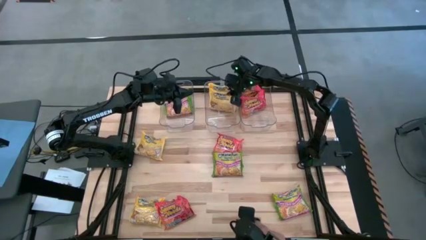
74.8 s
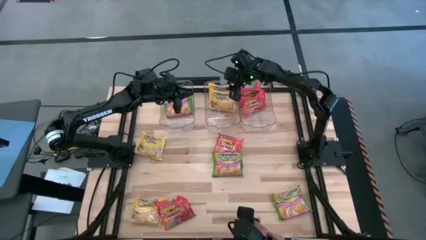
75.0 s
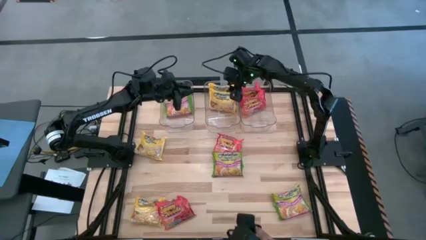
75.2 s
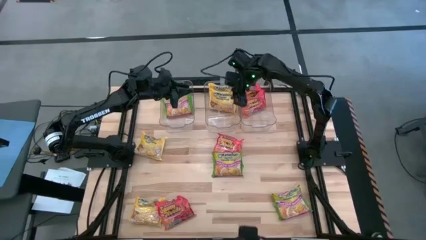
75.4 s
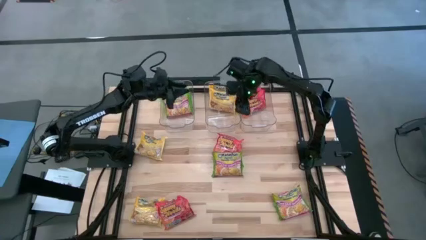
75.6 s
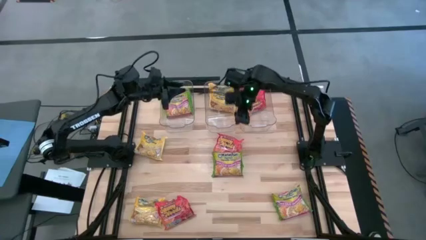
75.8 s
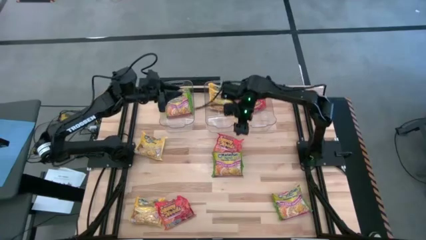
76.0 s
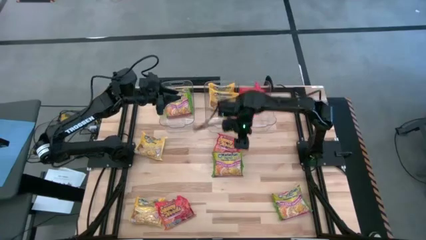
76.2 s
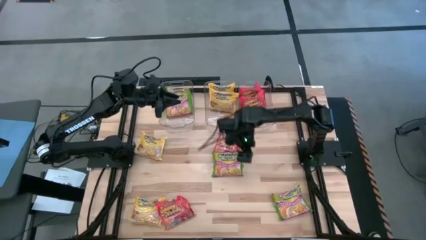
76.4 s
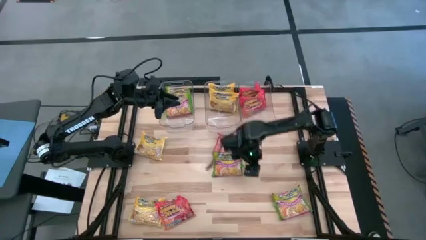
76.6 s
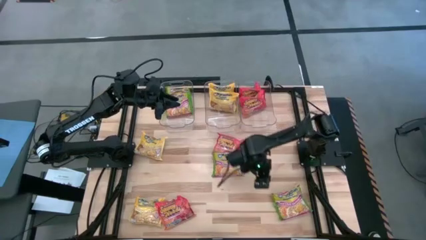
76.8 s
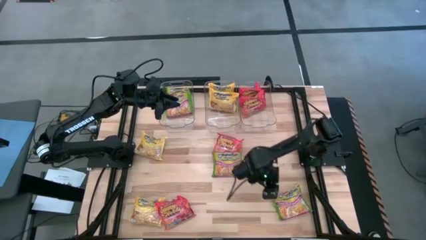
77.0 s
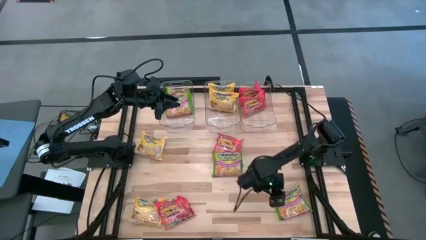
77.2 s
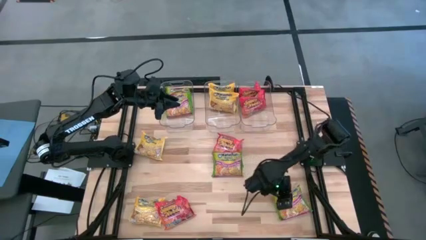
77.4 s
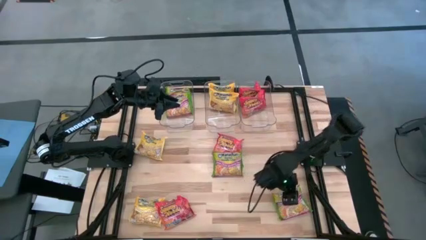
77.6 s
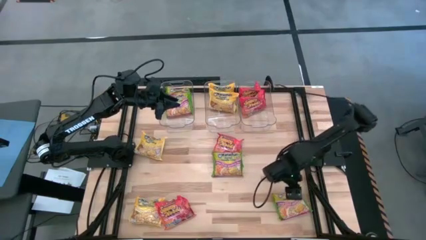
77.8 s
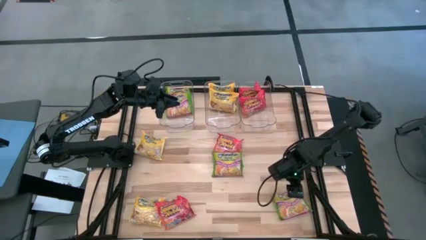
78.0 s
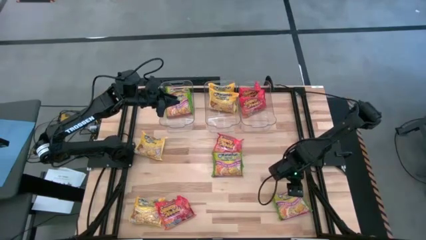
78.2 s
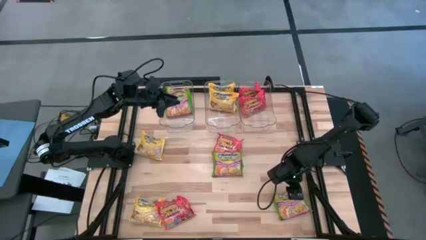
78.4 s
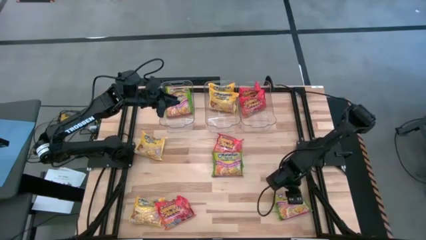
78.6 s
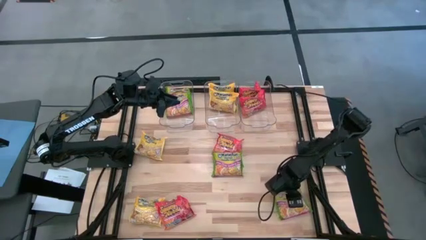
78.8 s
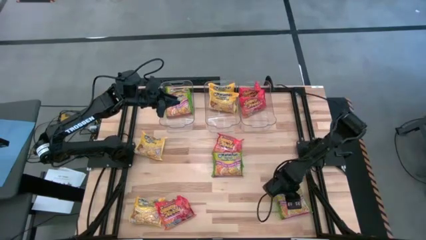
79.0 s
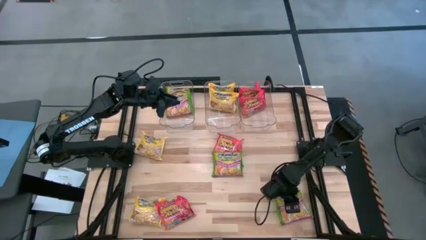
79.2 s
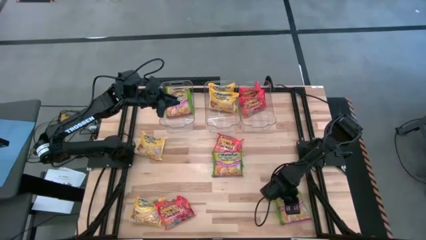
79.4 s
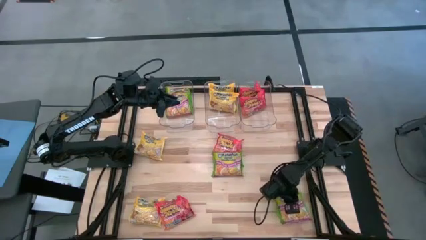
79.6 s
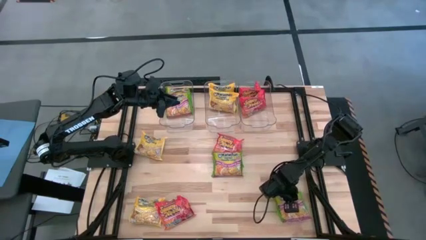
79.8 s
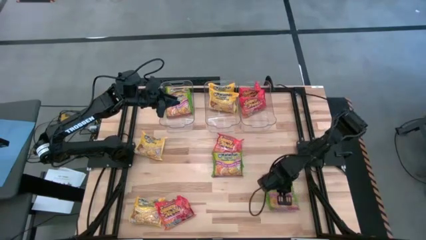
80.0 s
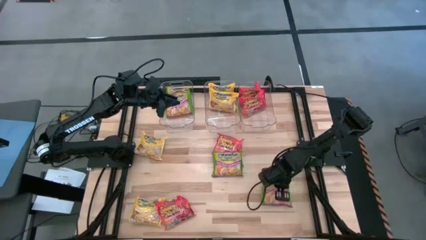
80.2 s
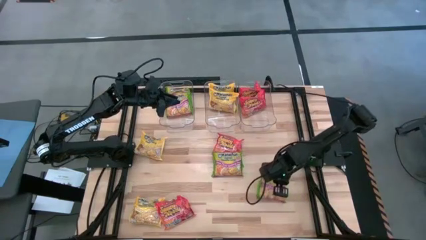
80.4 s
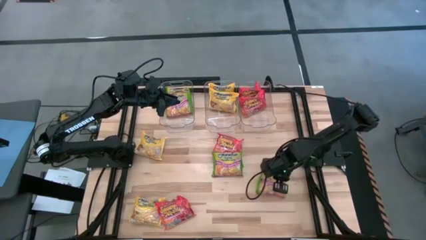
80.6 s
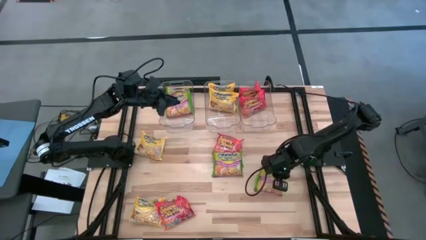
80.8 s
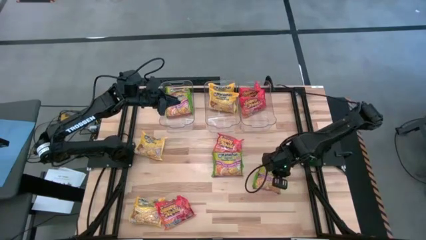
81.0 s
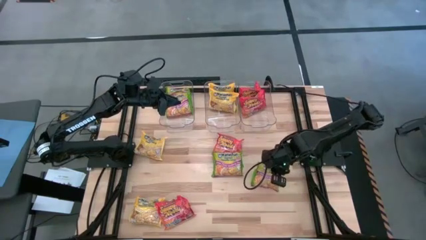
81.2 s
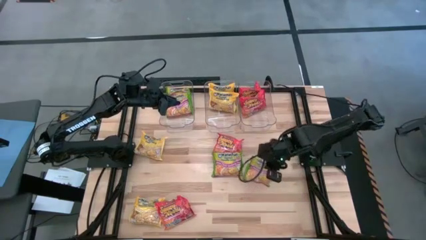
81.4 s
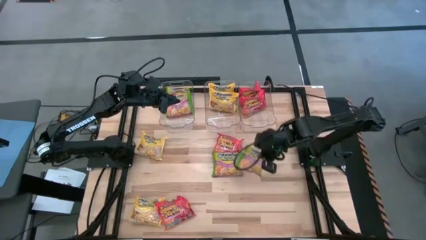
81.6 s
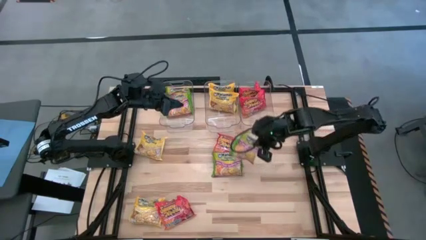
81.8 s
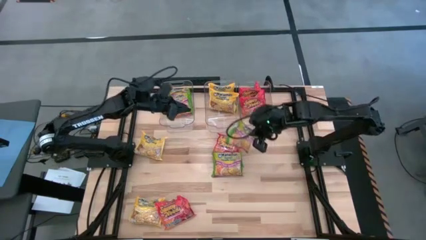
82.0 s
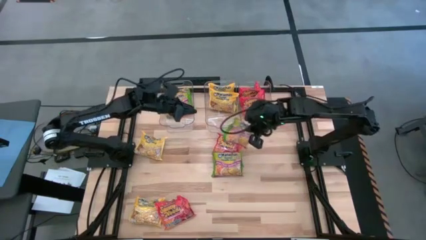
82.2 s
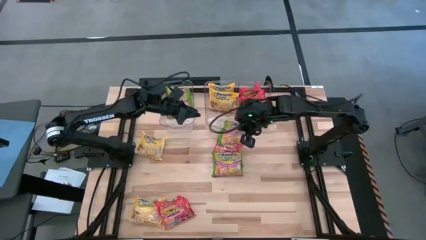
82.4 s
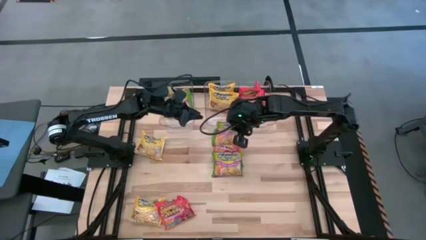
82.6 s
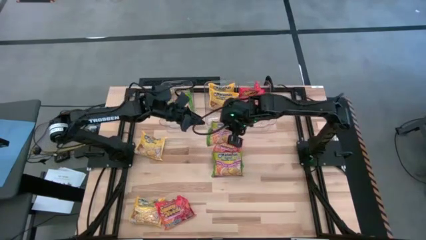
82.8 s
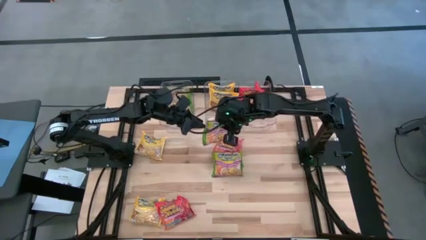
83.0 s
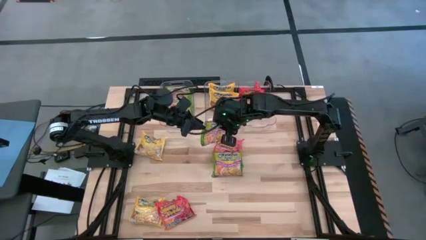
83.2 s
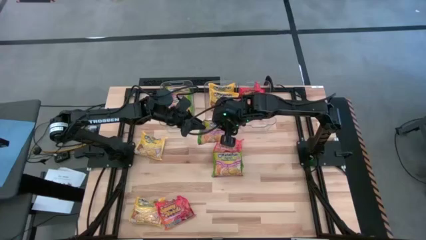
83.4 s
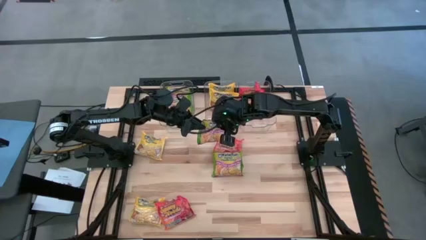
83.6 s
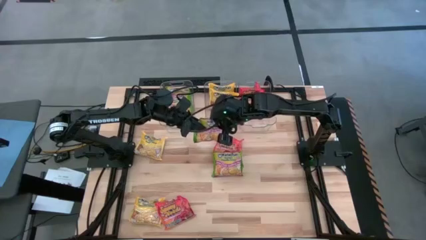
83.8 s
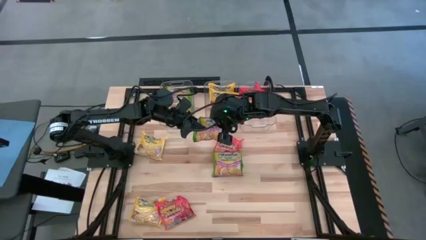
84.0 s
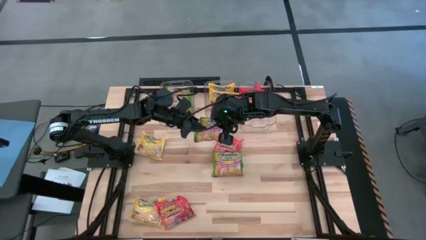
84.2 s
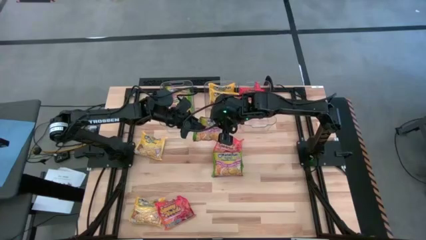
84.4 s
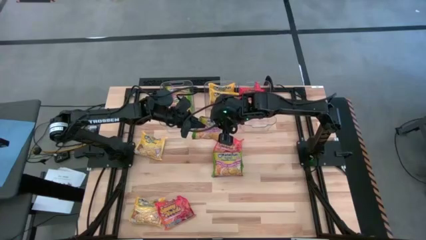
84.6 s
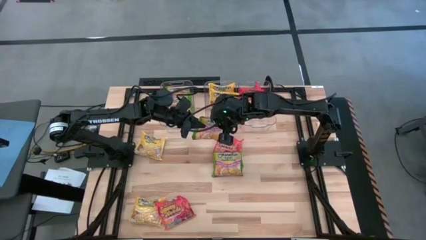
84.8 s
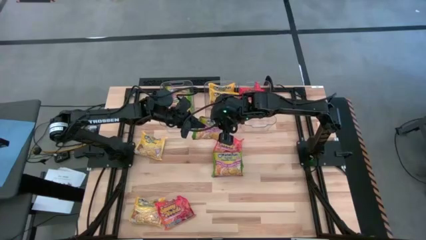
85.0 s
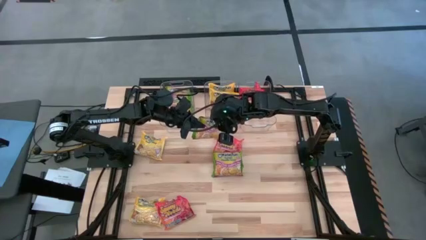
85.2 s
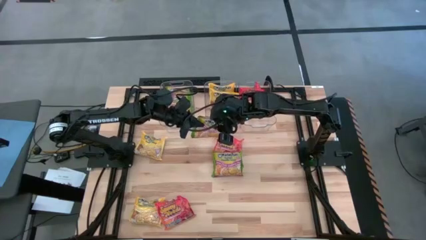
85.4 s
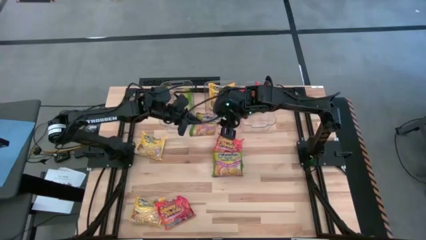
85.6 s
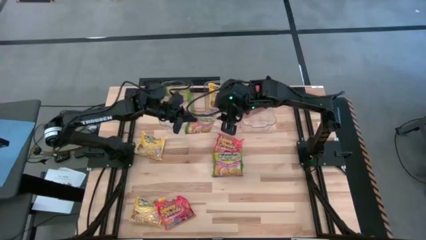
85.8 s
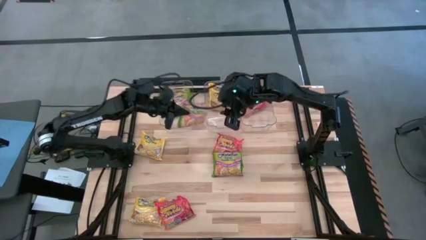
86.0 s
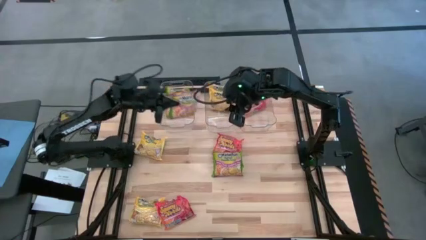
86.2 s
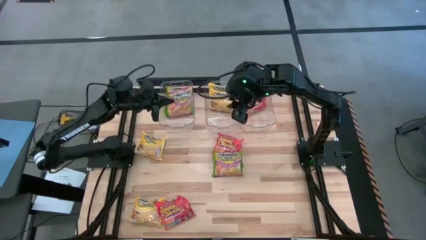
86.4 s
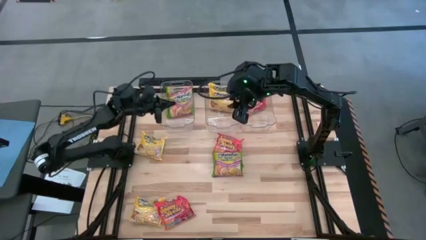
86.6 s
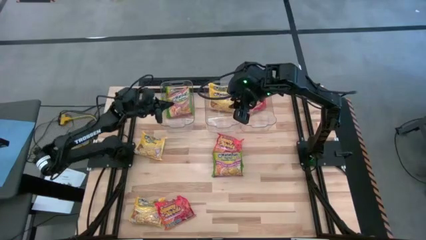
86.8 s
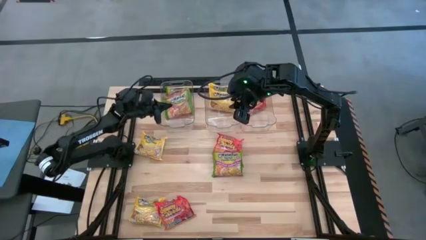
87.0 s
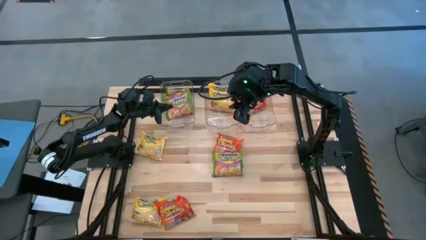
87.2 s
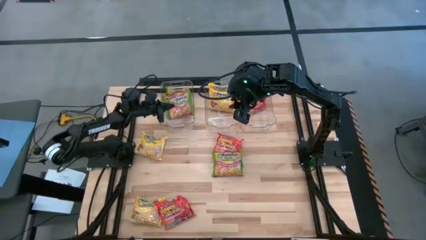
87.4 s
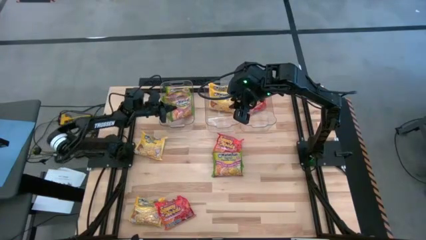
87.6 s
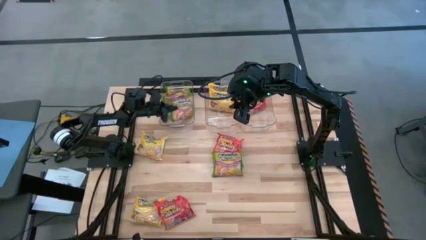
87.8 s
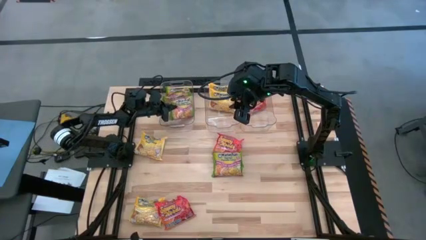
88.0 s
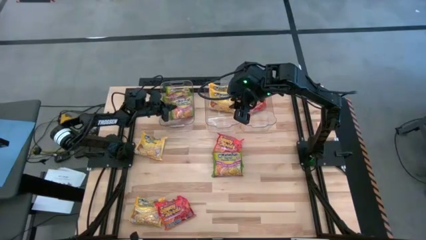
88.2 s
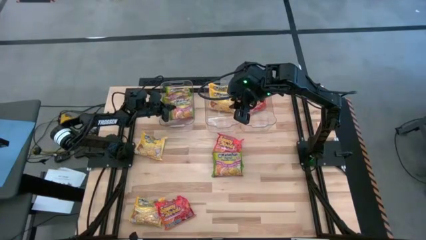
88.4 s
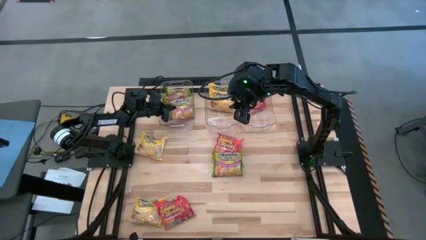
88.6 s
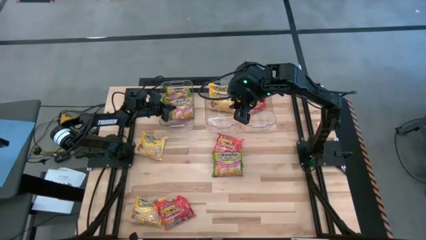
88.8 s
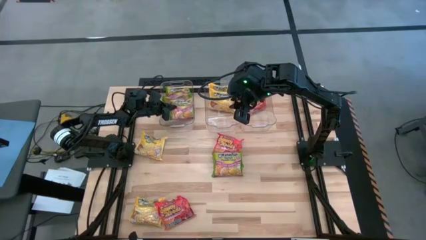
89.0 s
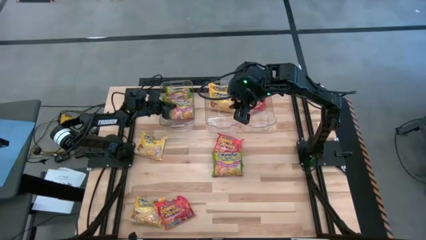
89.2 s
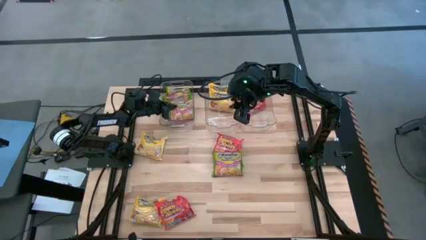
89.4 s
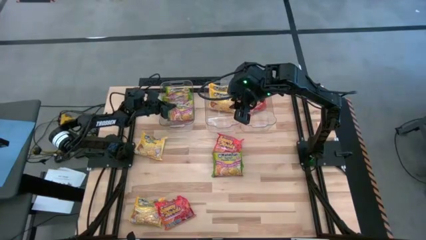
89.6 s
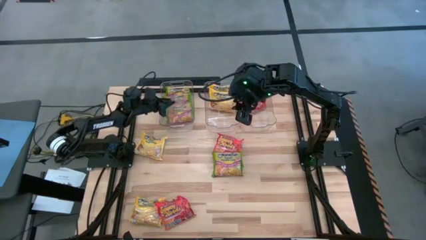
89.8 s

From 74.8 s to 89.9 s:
Task: Sort Maruchan noodles
Put the green noodle pack into the left transparent bin

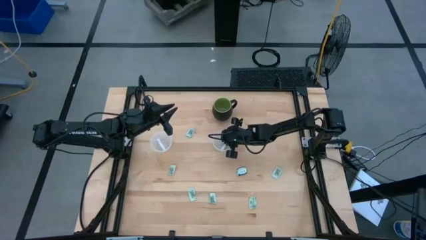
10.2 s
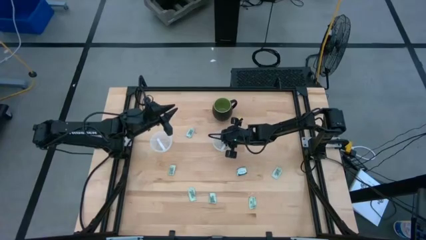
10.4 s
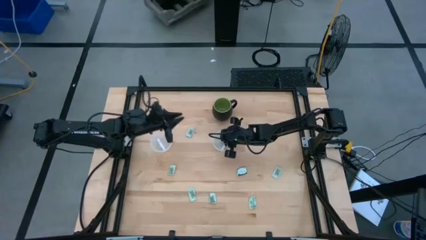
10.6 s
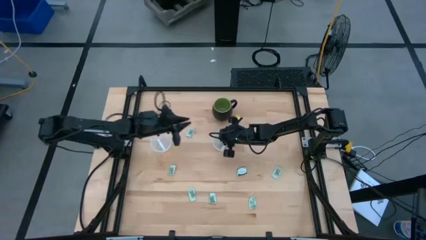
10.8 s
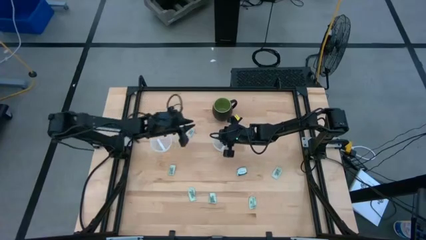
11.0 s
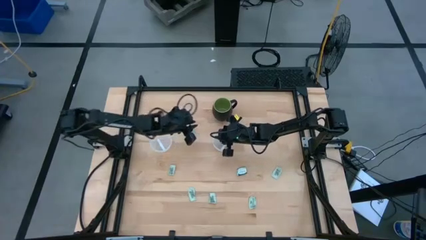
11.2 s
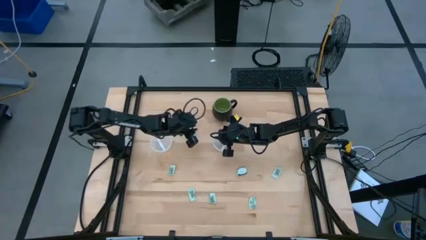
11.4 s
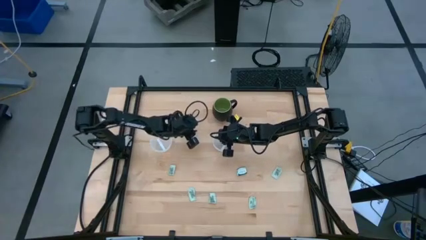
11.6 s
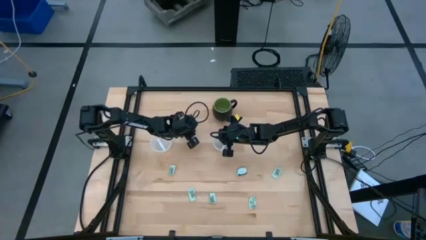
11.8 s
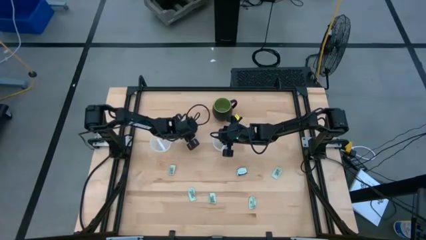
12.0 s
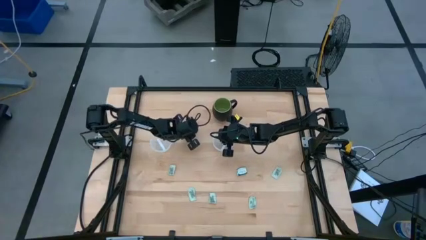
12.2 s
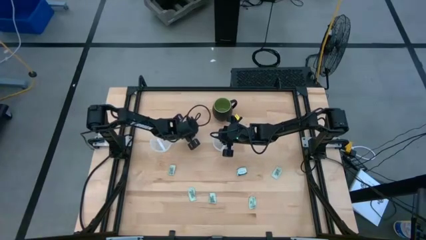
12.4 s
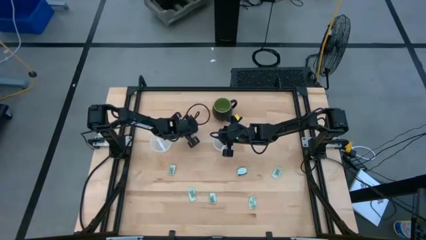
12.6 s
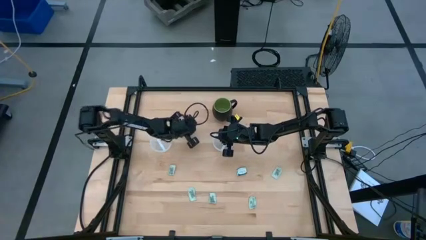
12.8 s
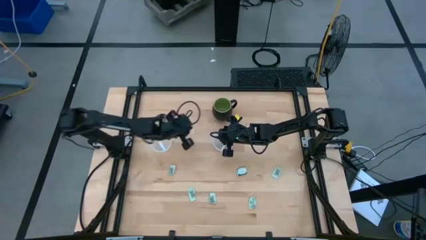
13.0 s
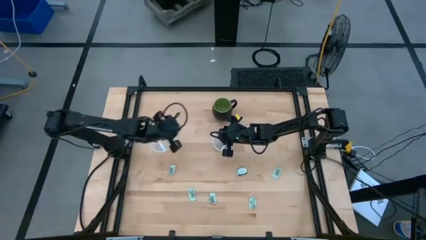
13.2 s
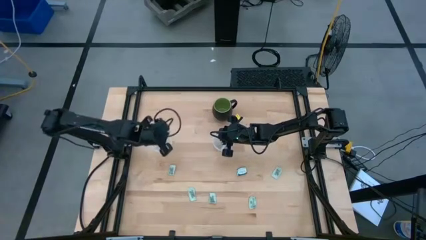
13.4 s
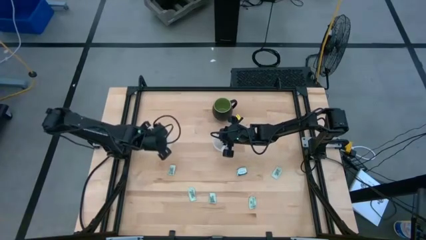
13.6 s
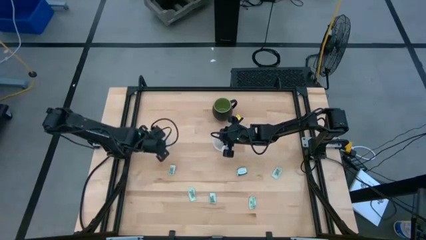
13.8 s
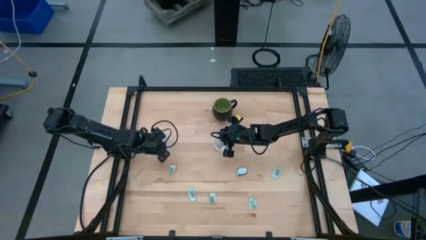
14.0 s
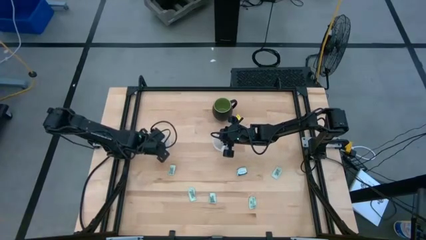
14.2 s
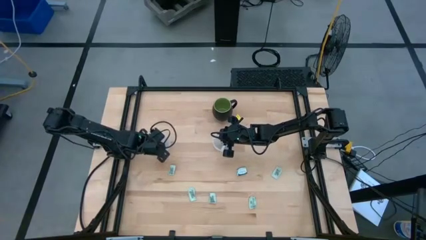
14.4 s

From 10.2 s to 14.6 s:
Task: Pick and place Stevia / Truvia into bins
Put the white stevia packet into the left transparent container
